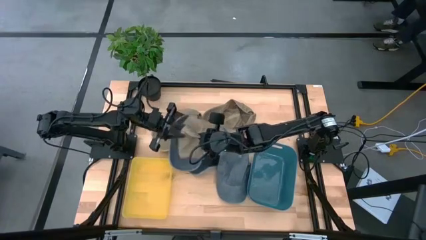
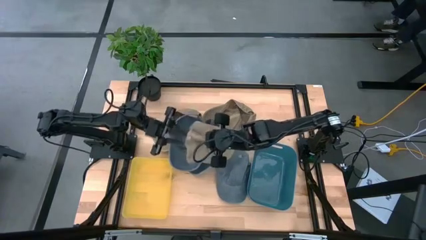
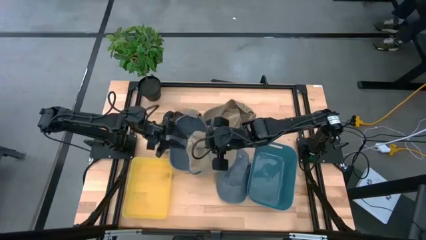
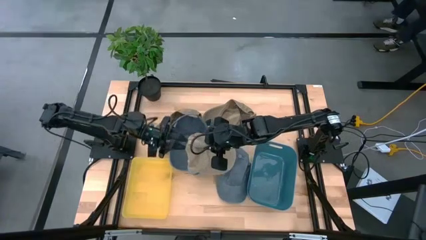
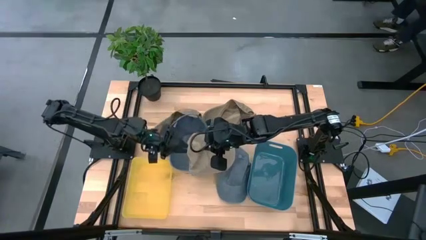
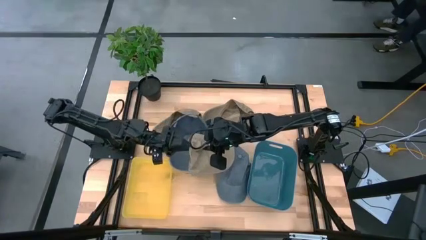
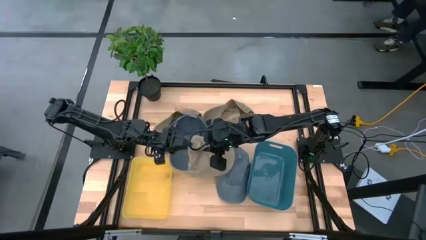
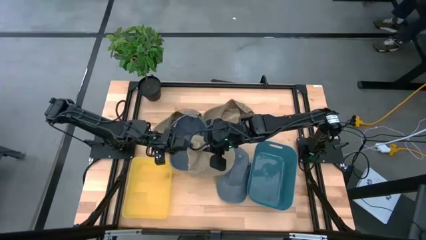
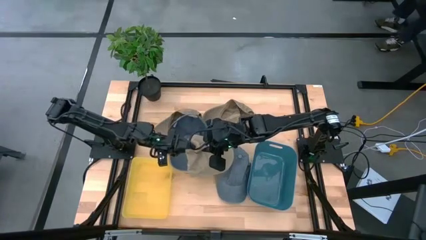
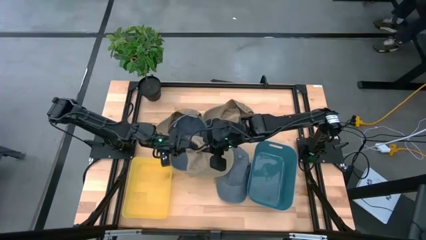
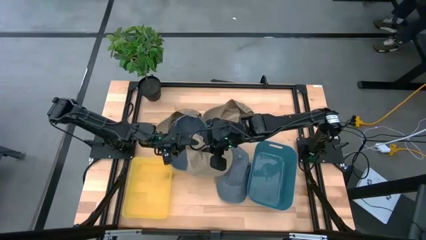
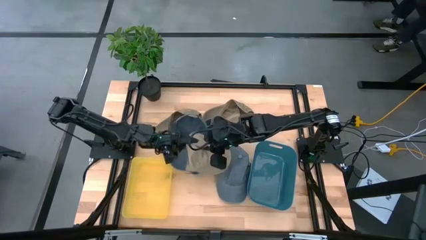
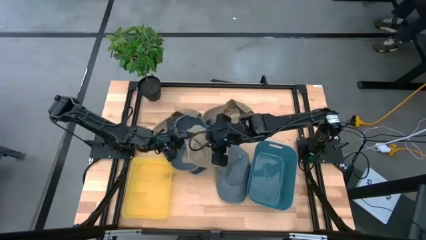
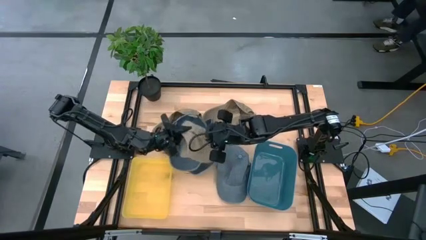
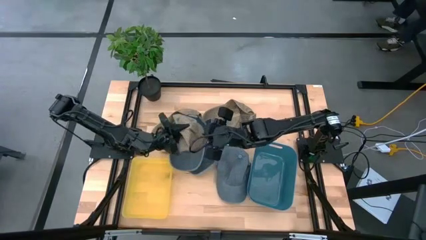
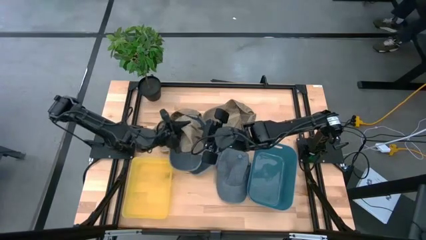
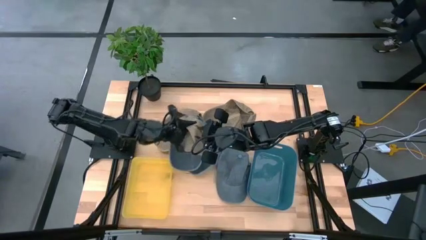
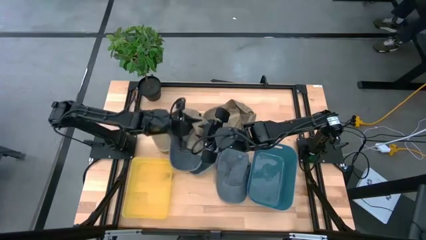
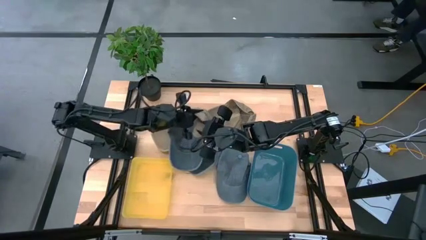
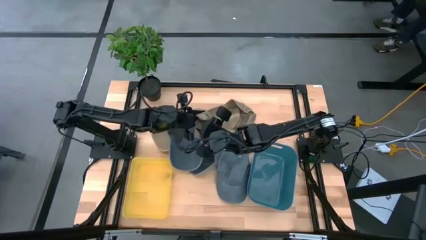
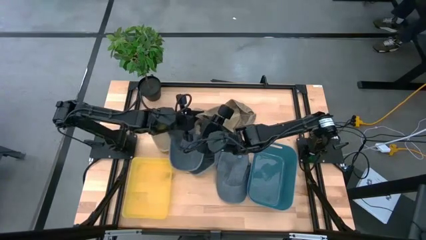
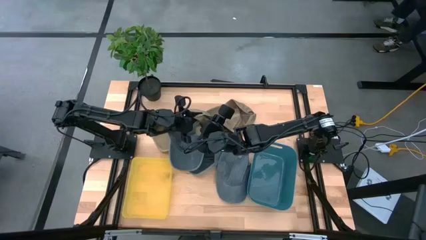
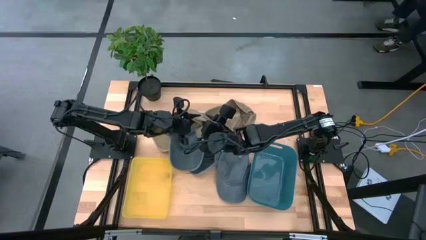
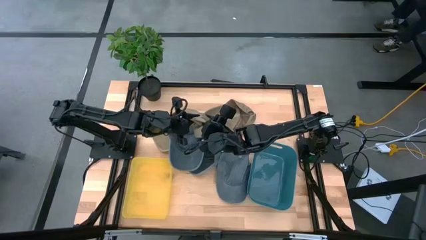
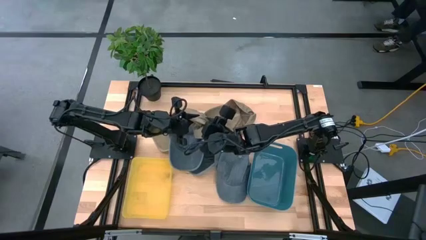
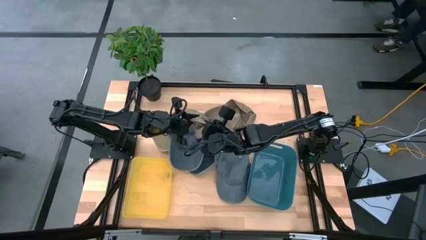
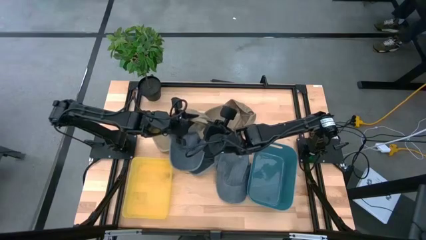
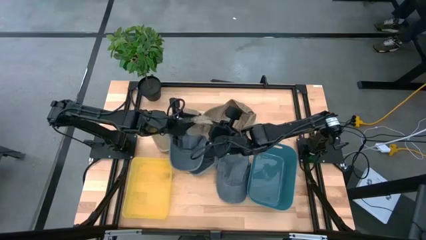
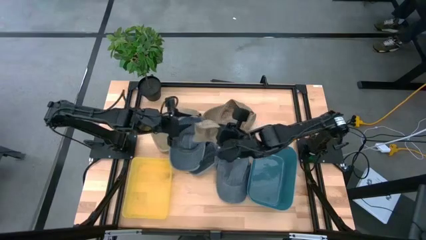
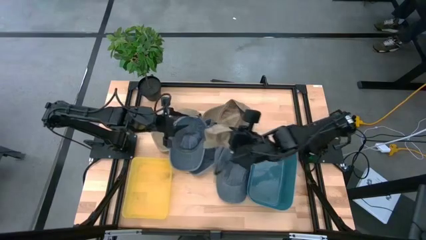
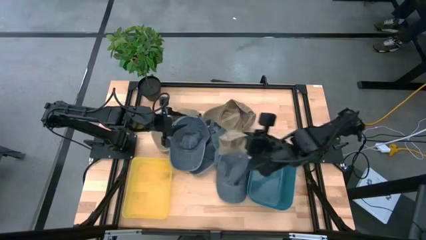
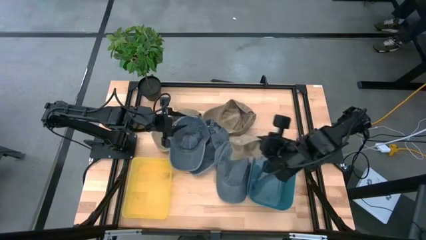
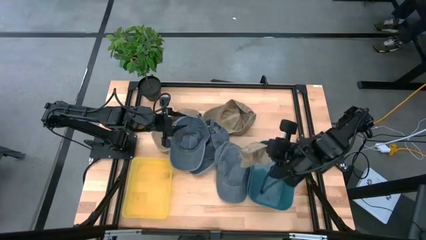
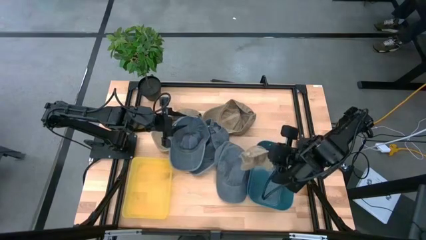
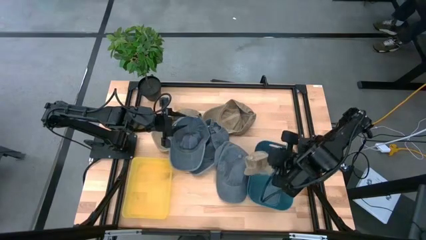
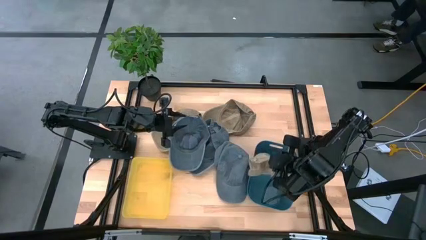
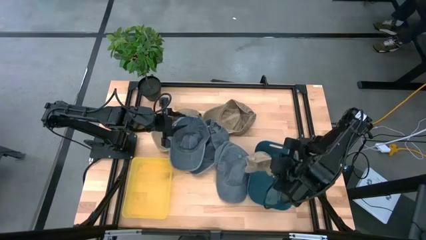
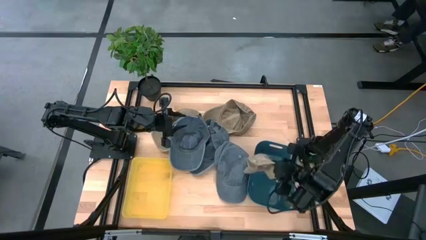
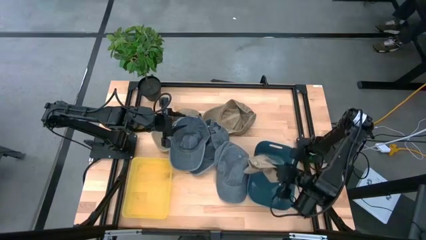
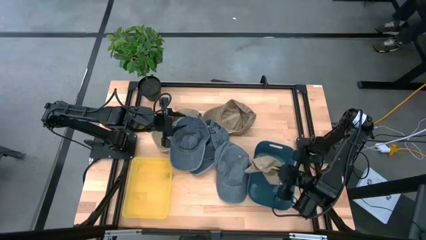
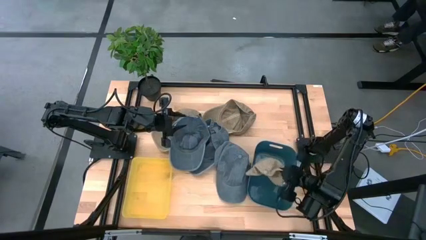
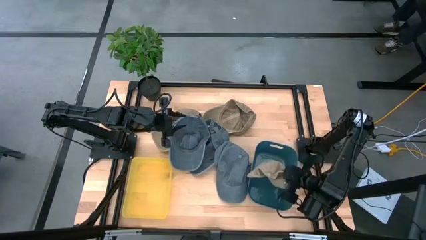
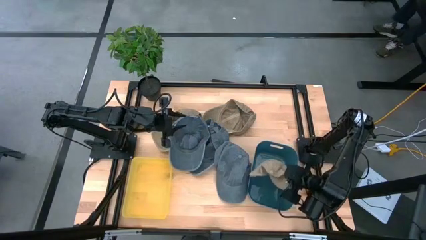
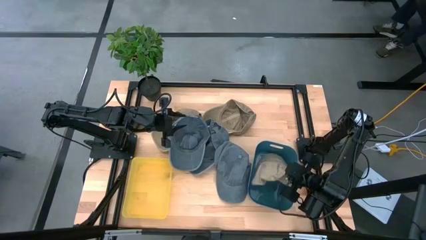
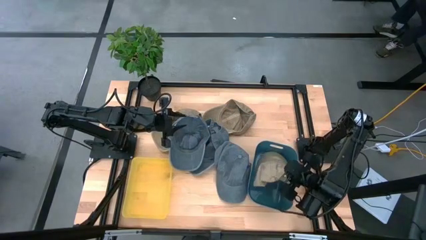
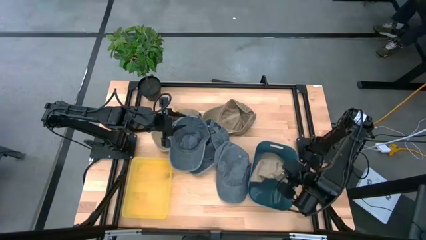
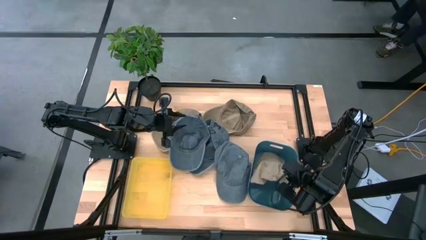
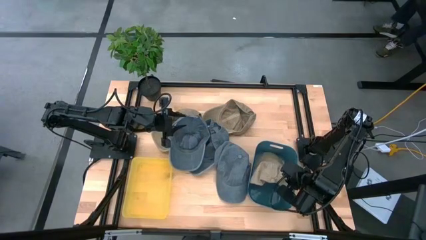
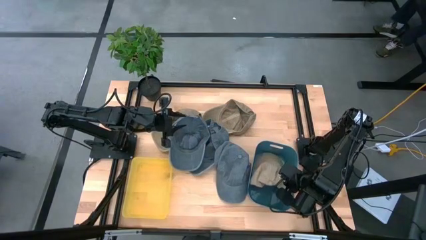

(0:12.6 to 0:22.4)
Task: Pick & Place hat
Put the bottom brown cap into the blue bin

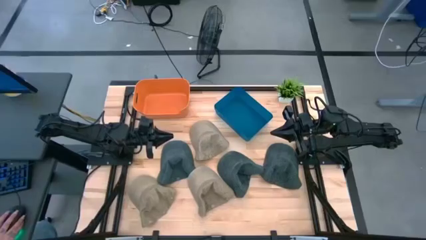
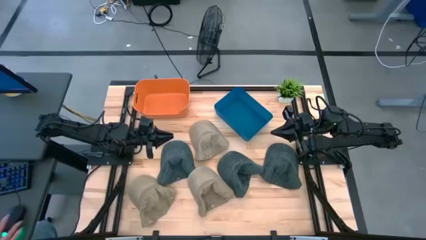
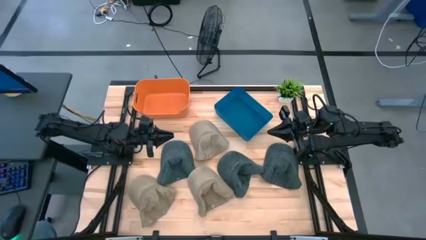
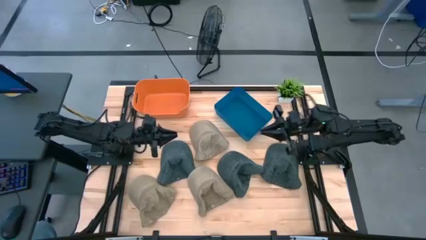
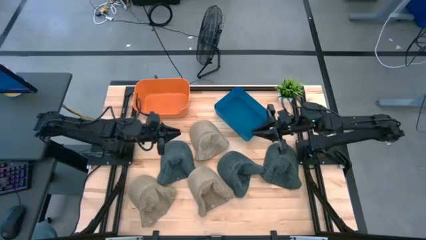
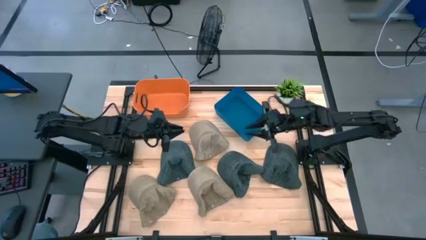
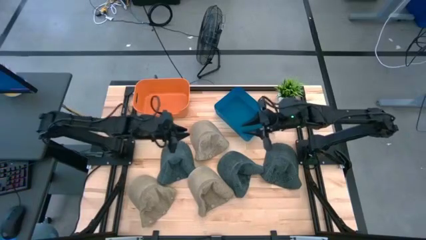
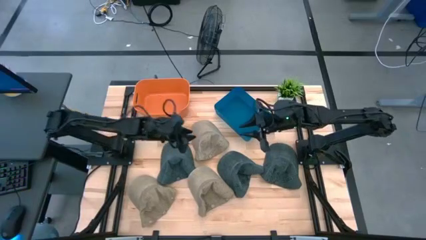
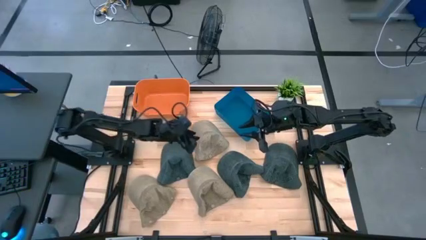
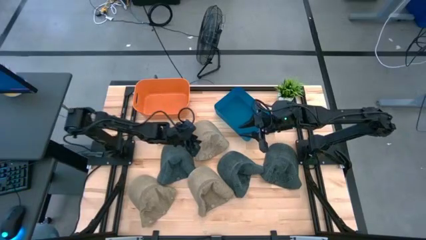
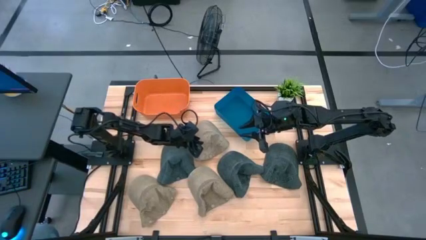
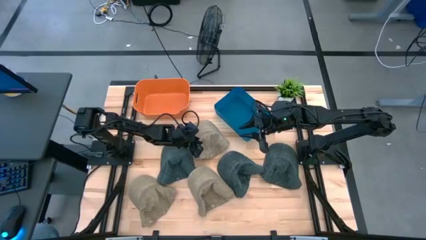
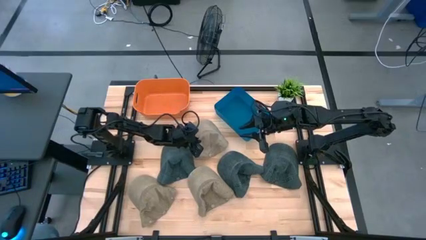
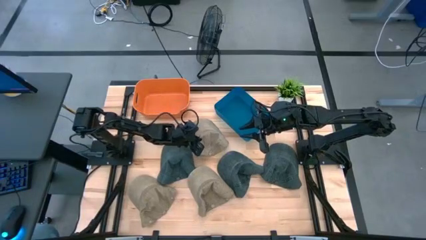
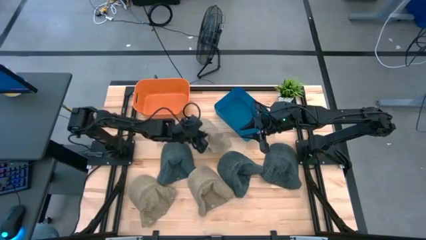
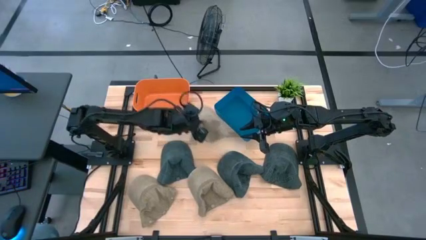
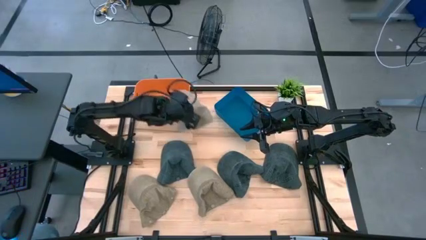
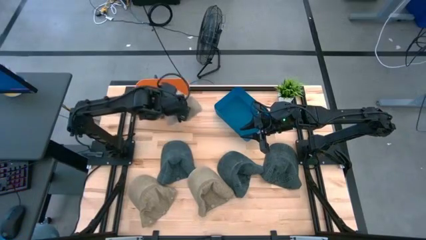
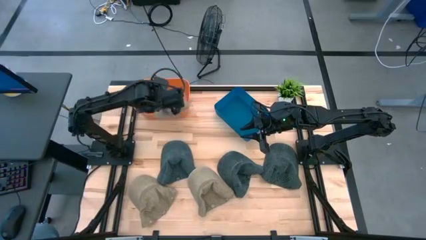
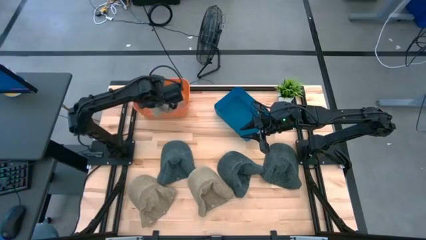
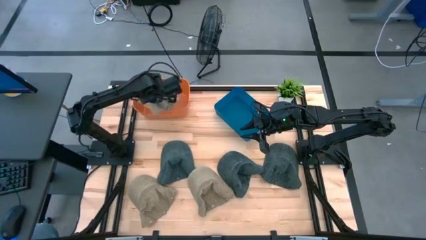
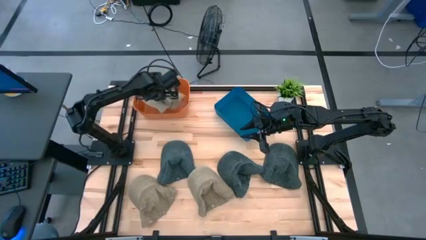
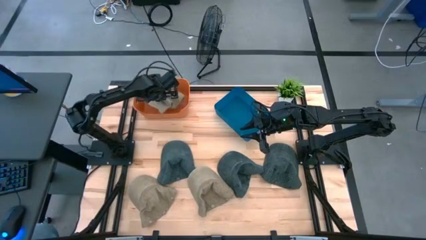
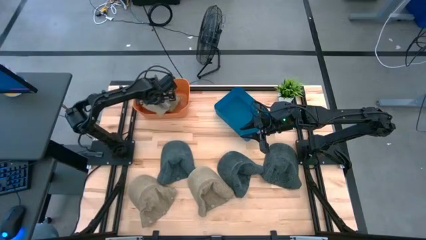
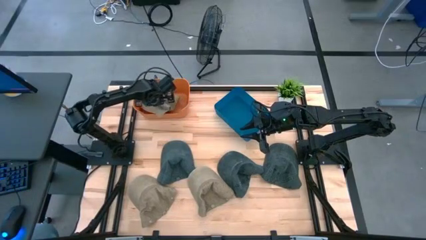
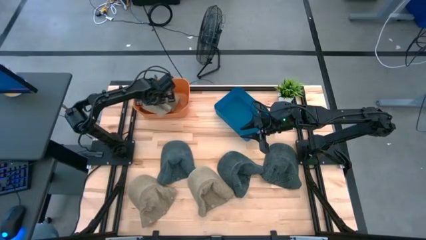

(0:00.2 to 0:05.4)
Task: Pick & Place hat
Put the top right brown cap into the orange bin
